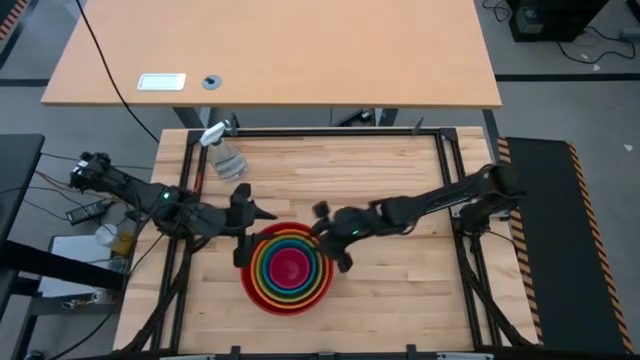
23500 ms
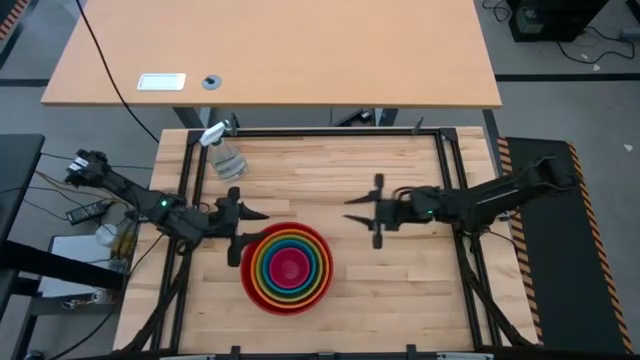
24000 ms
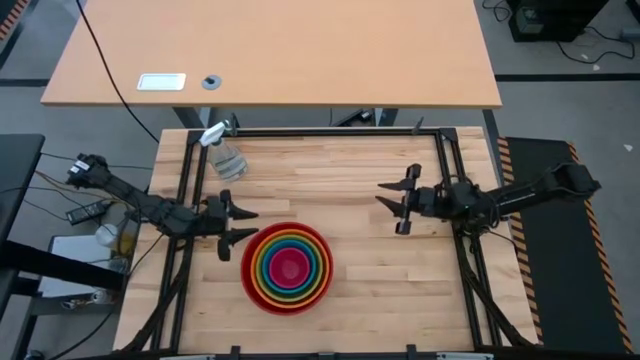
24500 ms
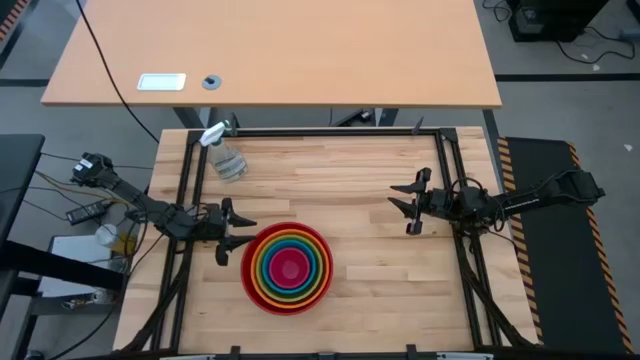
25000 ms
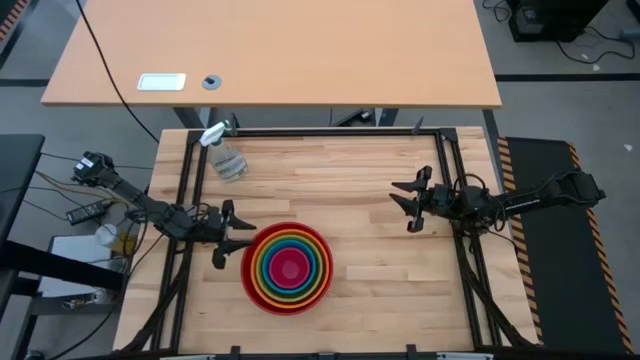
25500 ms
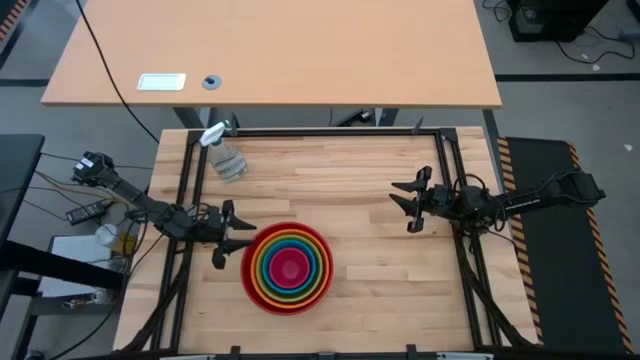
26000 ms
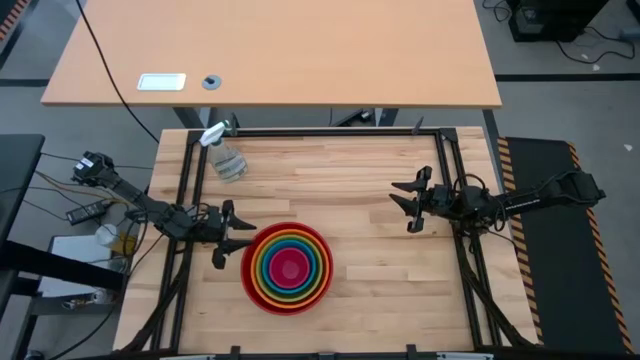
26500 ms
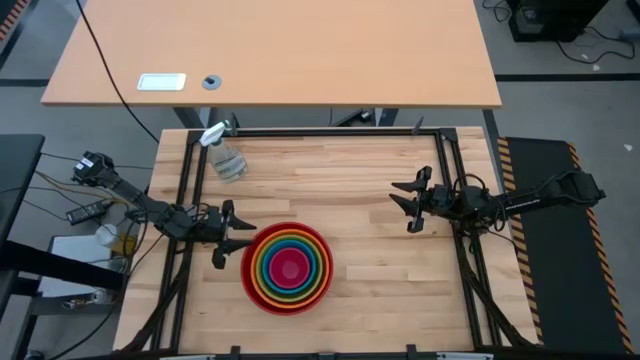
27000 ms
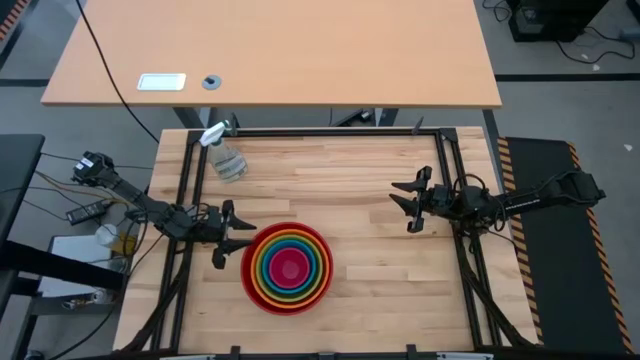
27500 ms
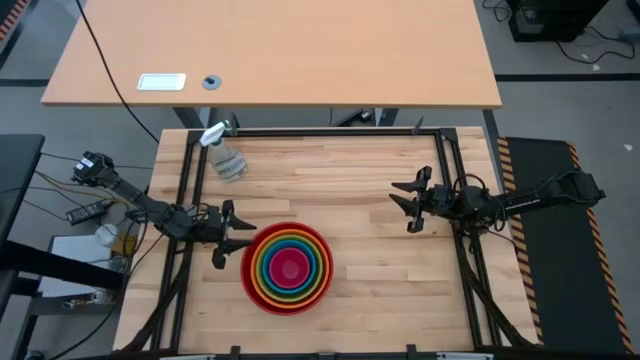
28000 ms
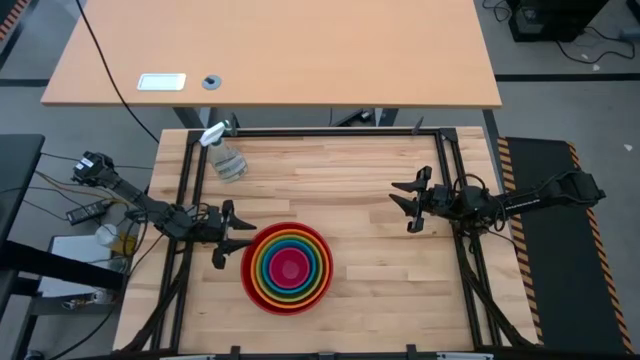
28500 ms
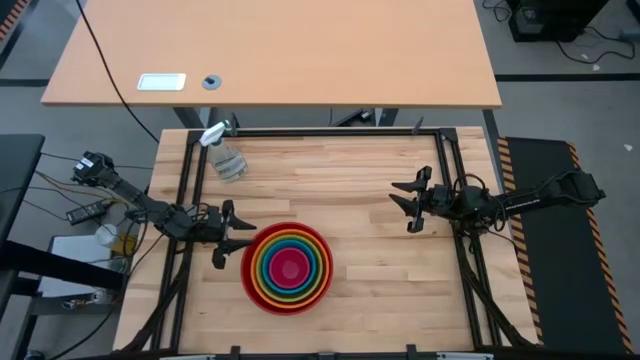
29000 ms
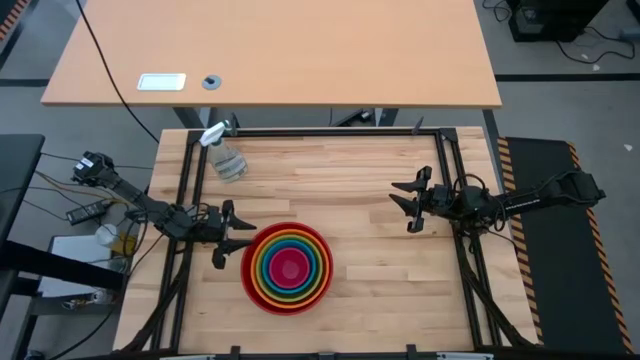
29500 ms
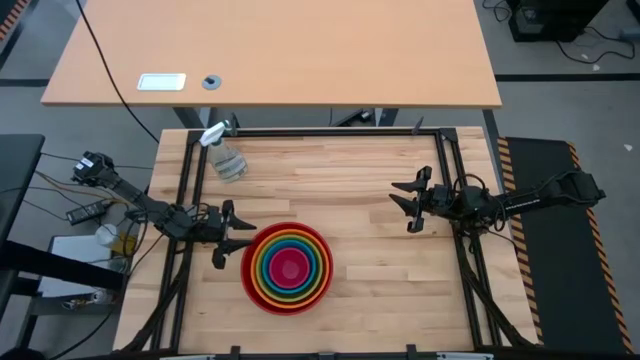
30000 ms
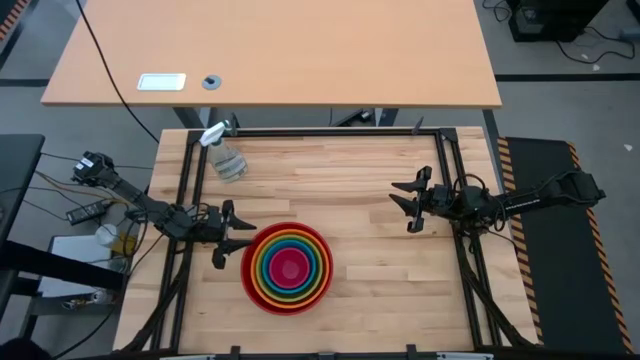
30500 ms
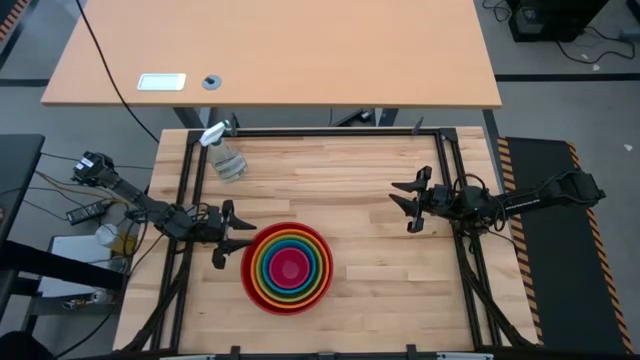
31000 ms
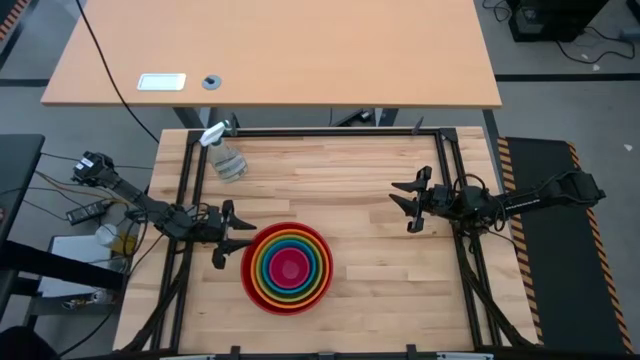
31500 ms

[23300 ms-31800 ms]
Return to Home Position

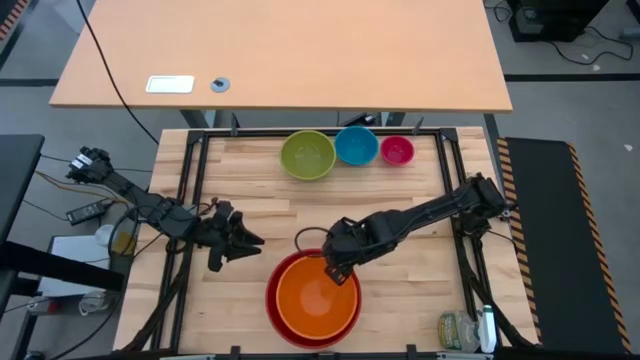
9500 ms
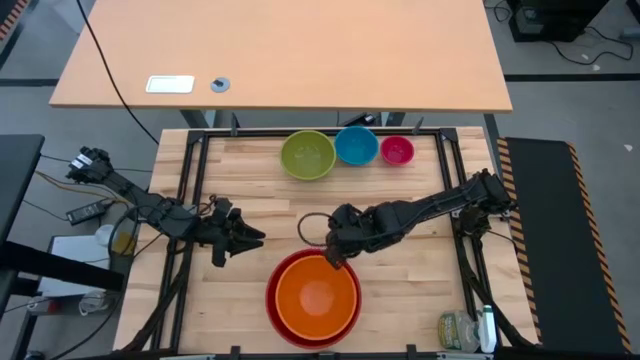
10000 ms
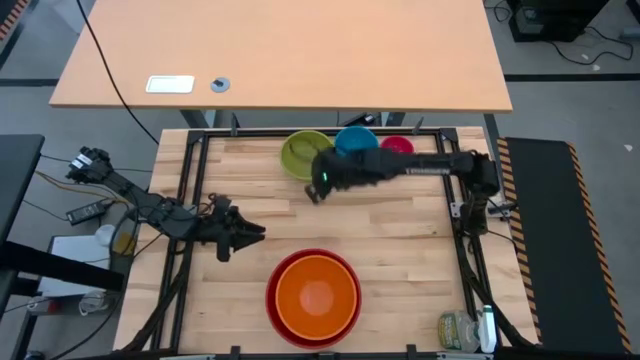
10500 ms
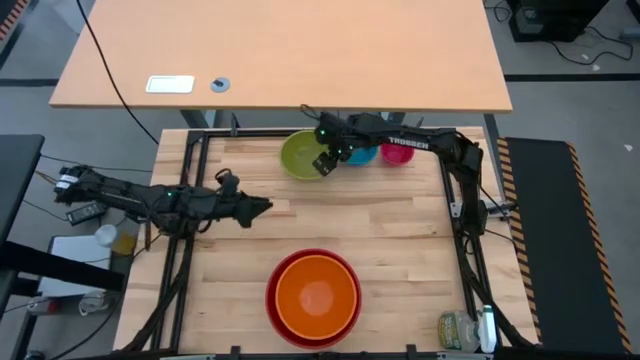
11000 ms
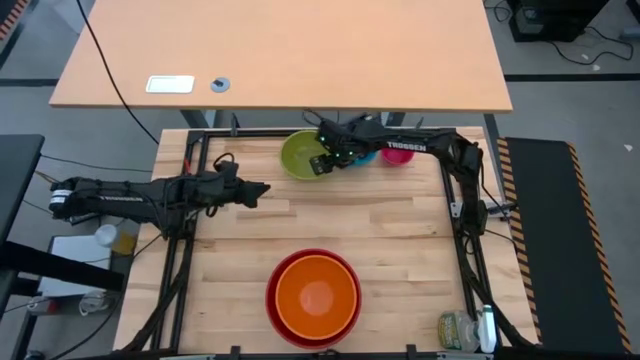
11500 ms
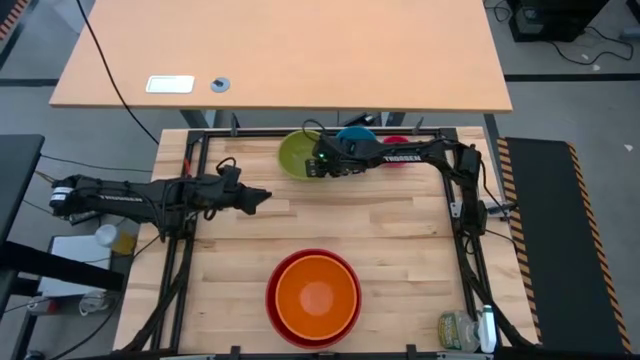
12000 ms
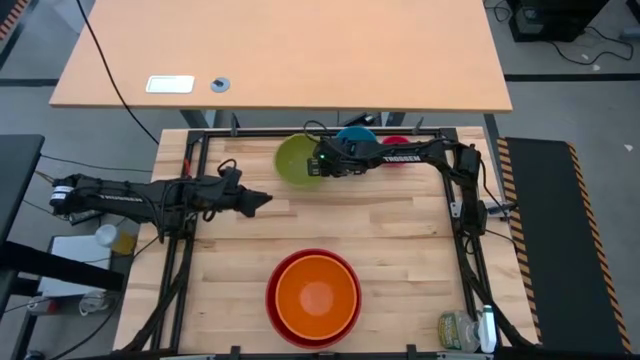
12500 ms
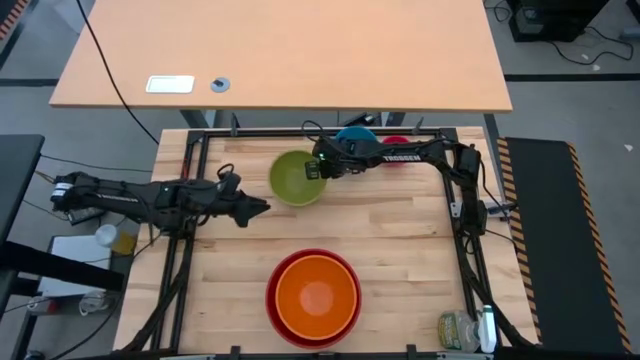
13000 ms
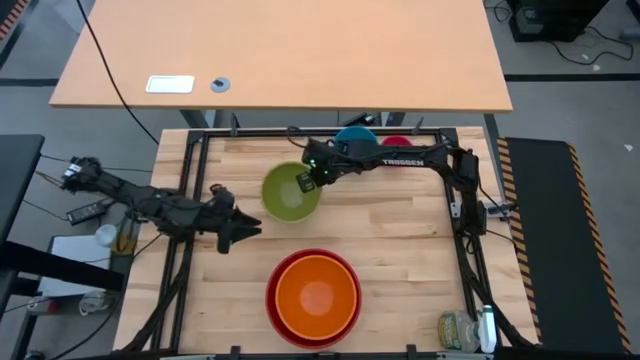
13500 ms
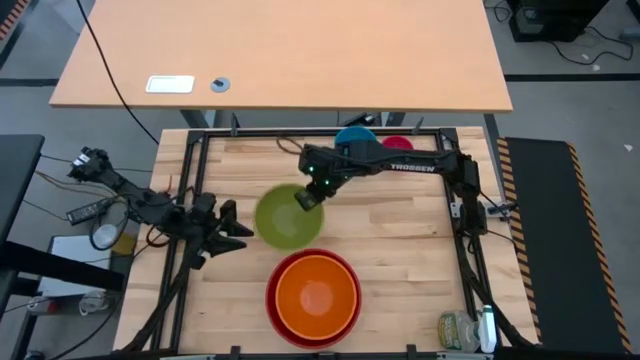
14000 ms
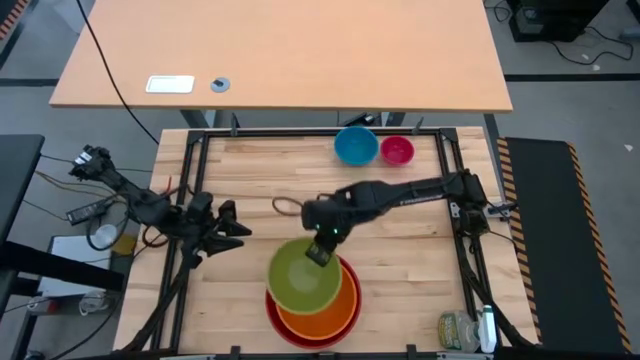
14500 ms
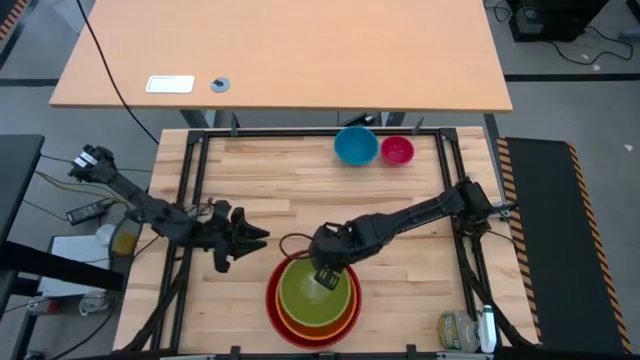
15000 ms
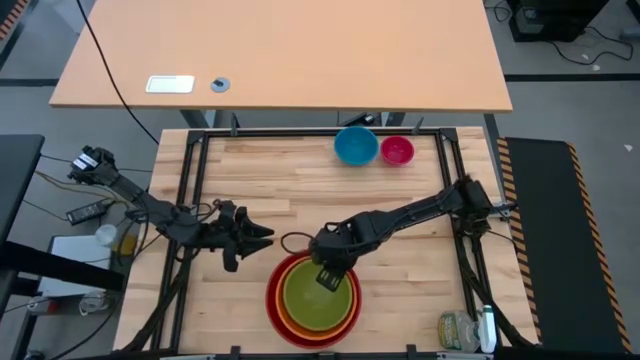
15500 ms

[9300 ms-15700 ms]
Stack the green bowl on top of the orange bowl

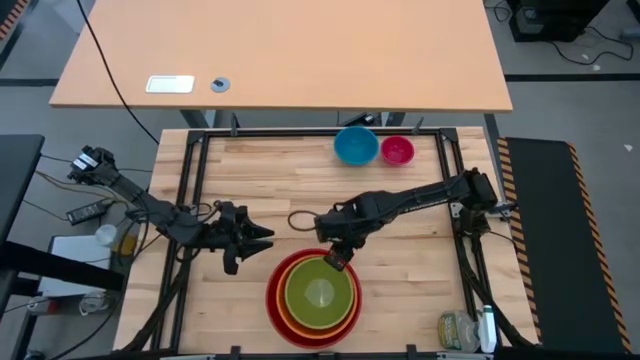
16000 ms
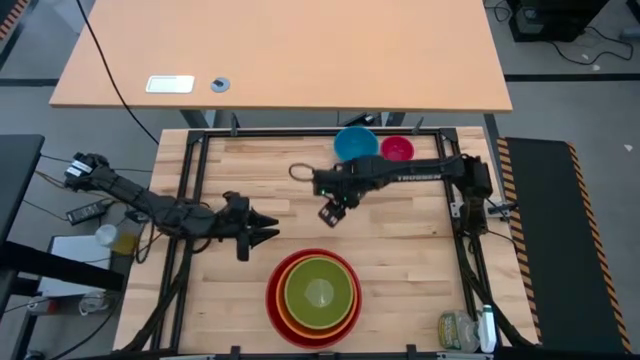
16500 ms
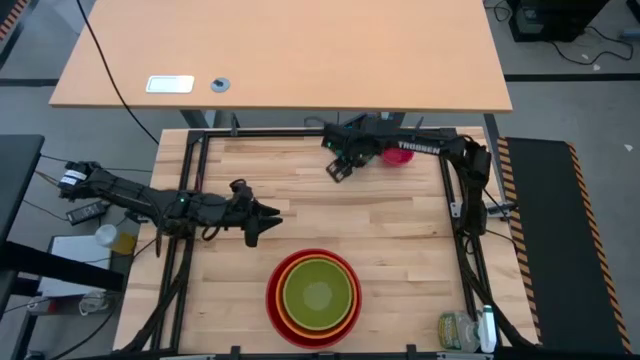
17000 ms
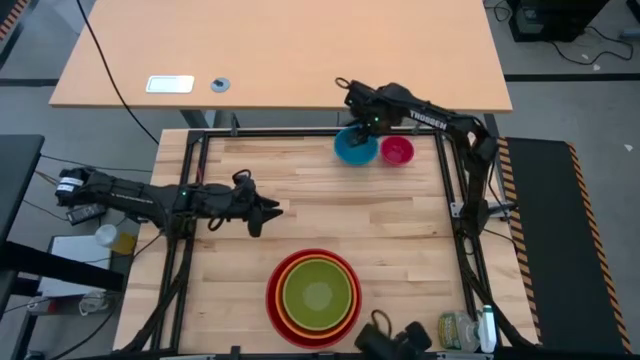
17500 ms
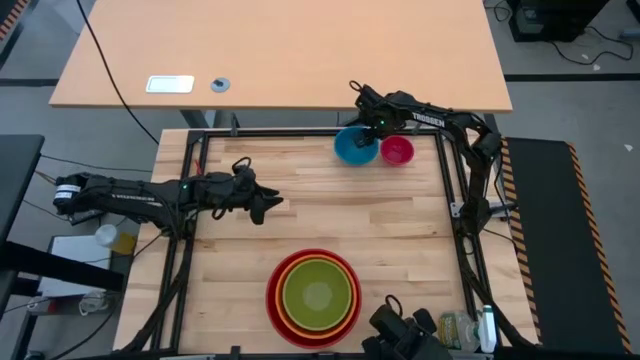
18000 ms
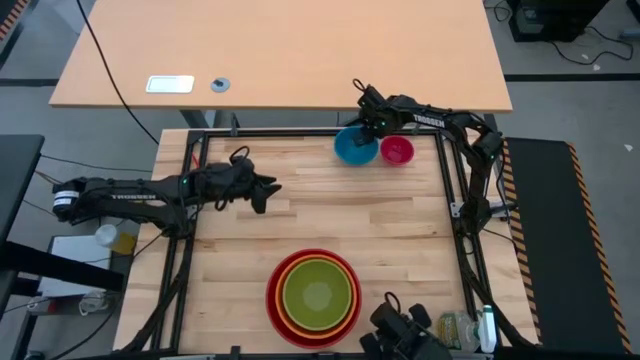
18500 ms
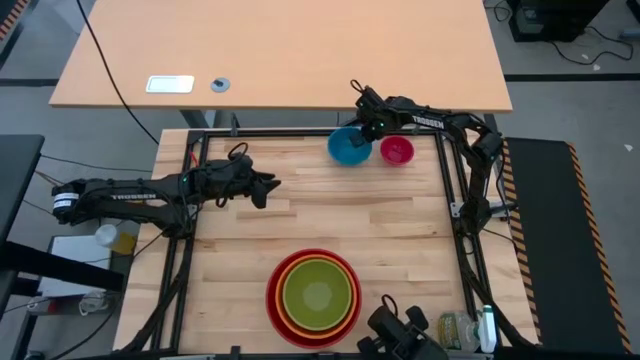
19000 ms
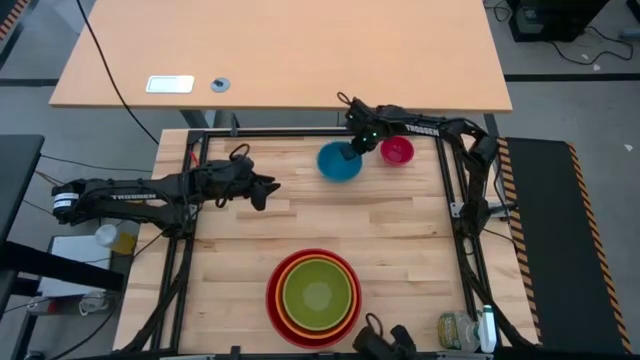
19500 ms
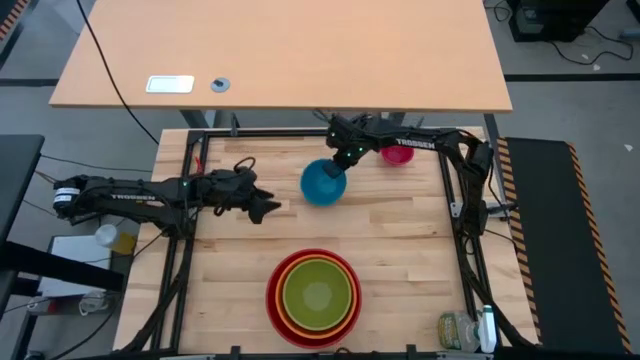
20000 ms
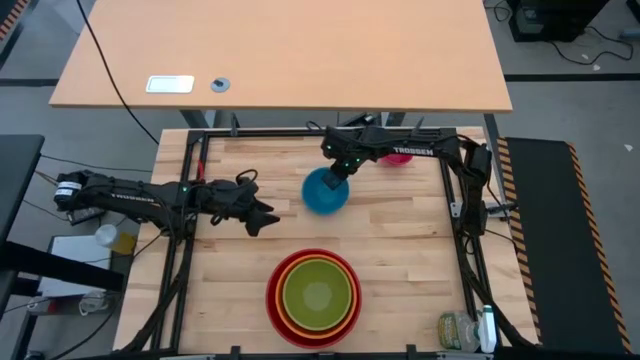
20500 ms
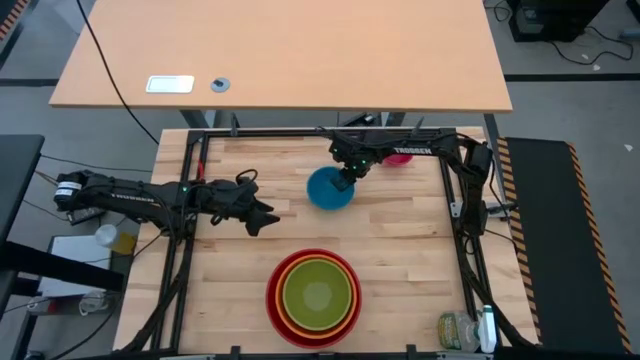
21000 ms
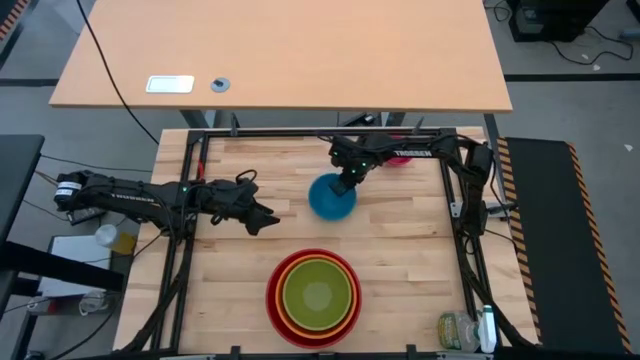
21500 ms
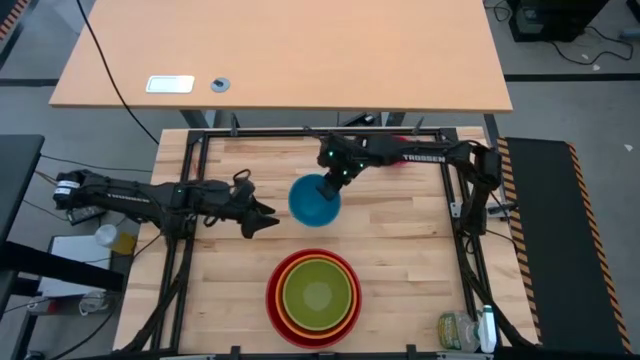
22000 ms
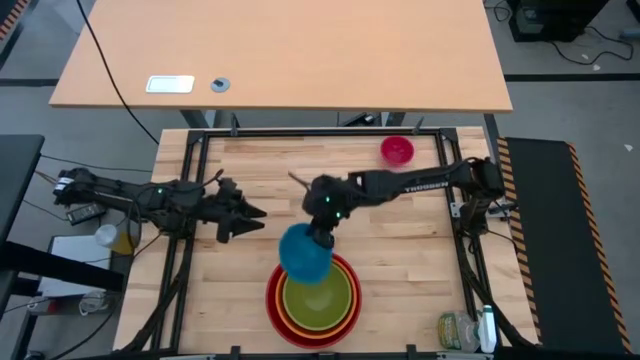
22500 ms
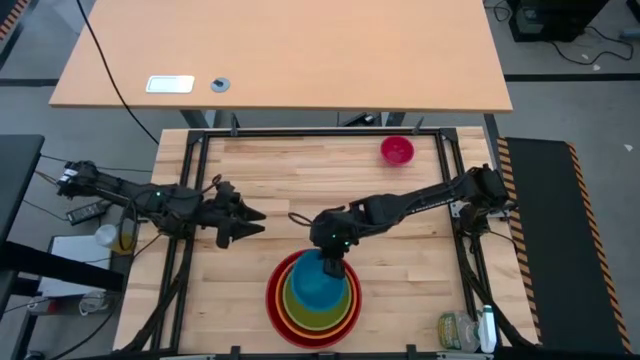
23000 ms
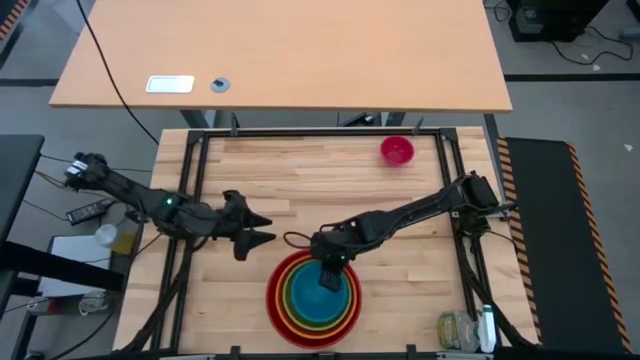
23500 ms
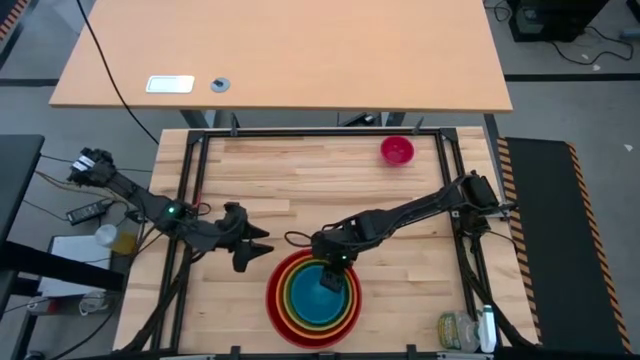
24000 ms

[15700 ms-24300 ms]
Stack the blue bowl on top of the green bowl
